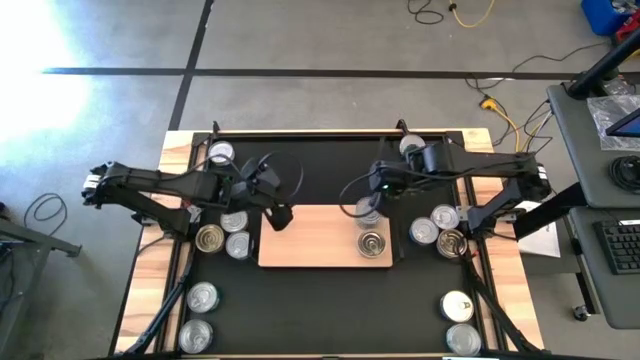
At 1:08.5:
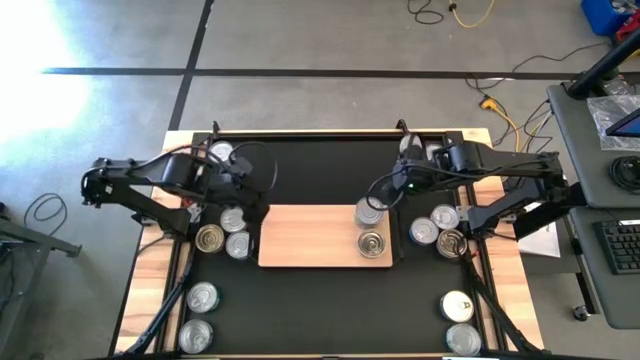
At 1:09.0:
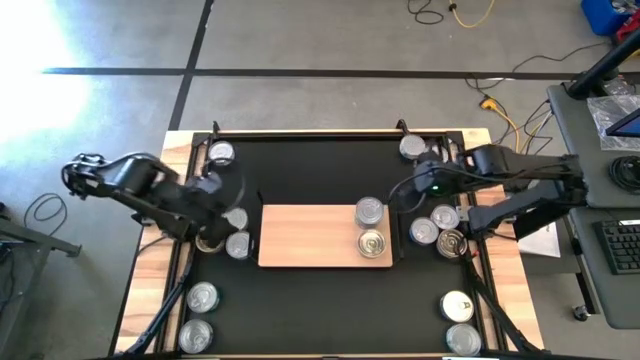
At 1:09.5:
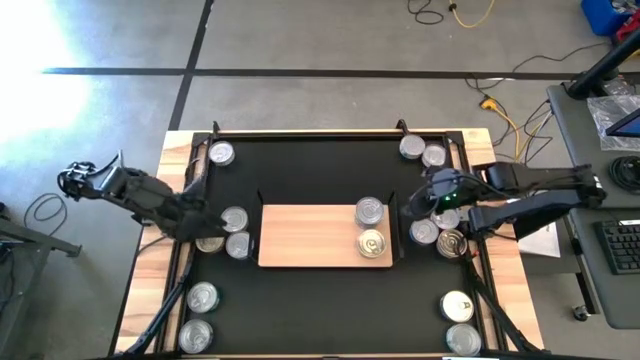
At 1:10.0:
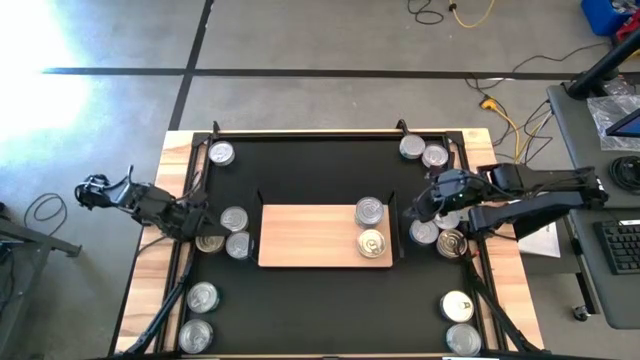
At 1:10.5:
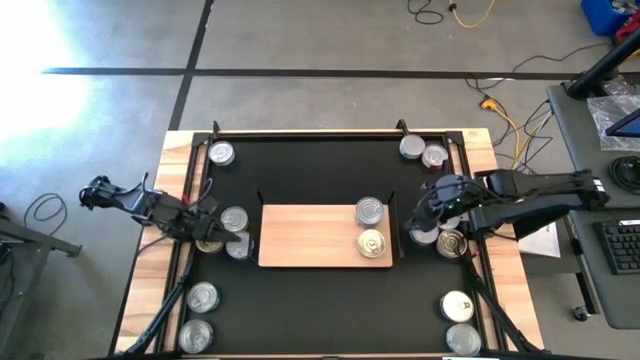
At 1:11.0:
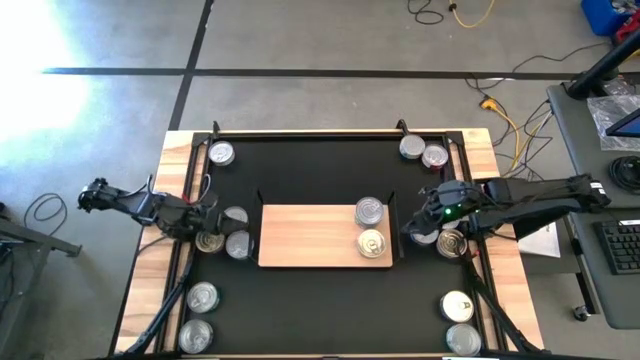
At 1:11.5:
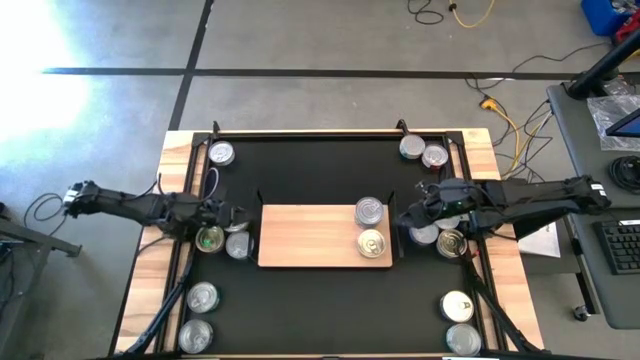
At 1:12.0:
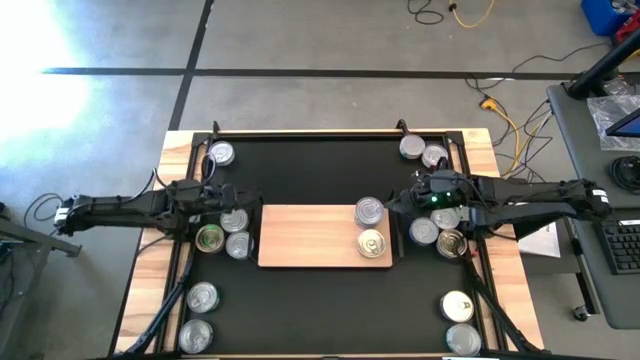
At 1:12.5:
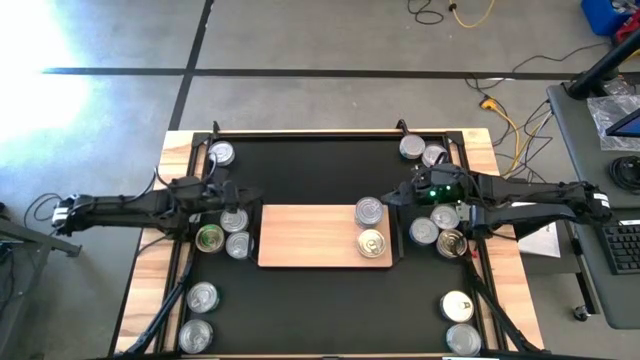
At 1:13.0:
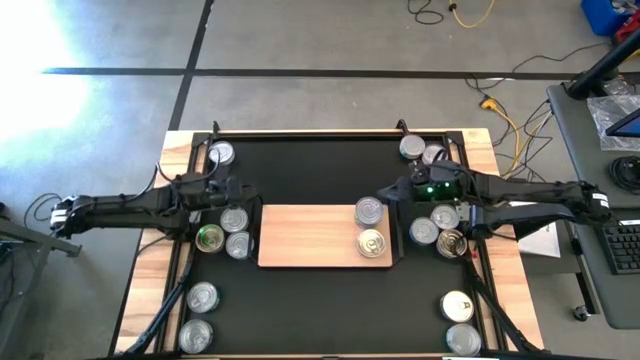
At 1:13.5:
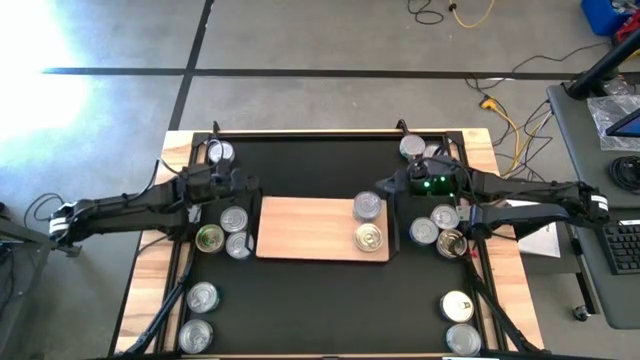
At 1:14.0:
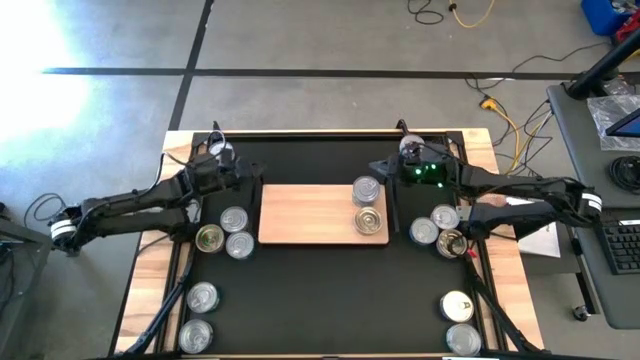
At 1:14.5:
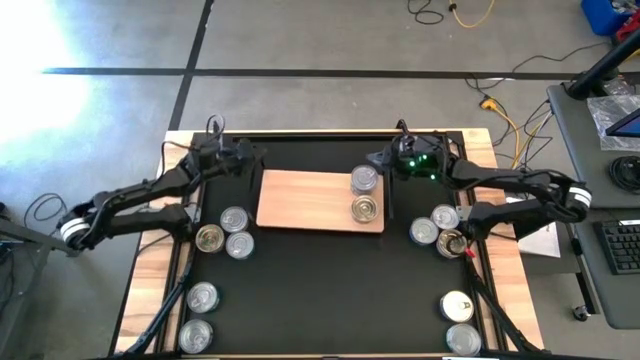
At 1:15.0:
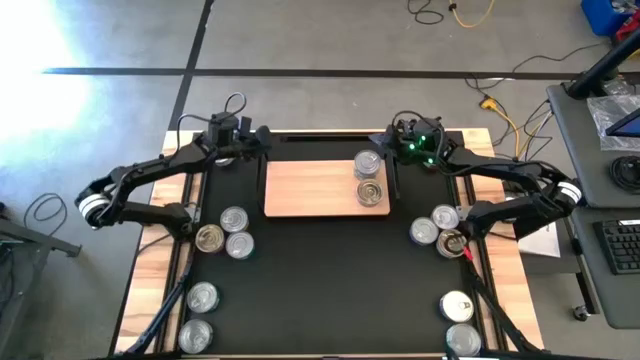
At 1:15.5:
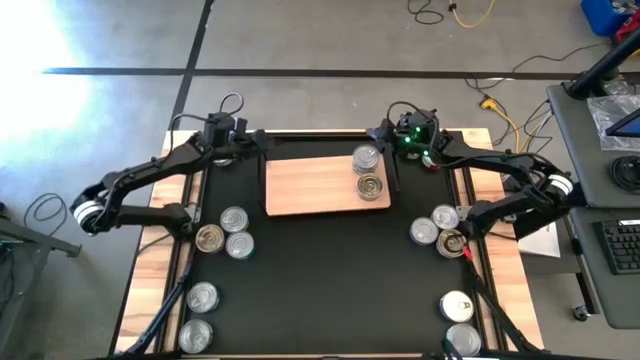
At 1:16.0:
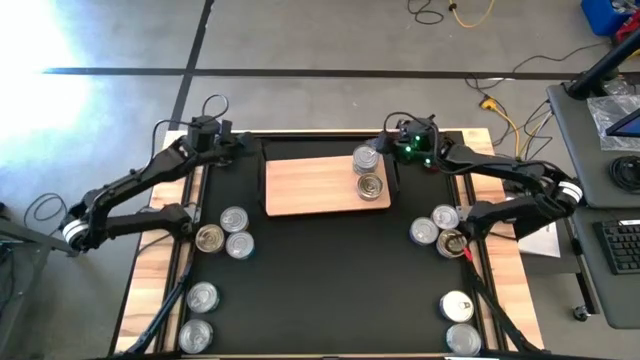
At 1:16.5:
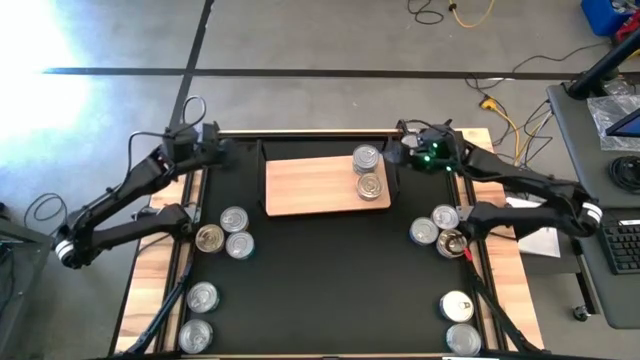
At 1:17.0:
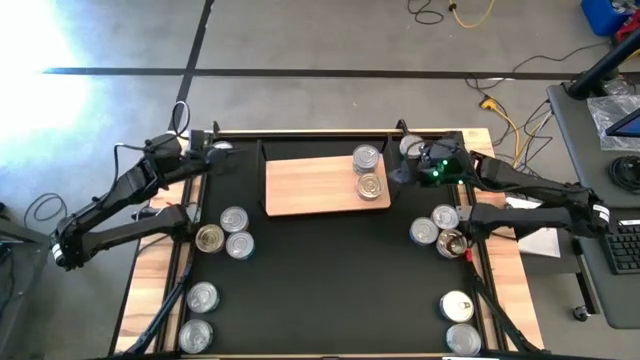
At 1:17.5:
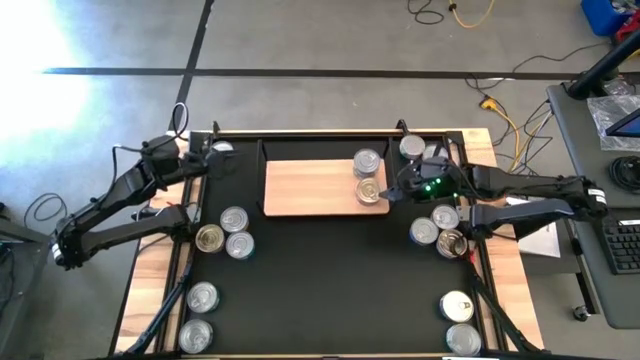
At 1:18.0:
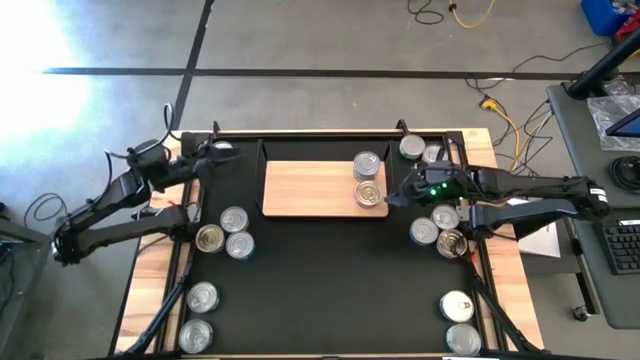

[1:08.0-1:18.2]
Task: Stack canned seafood by type on shelf
Move the shelf to the top of the table

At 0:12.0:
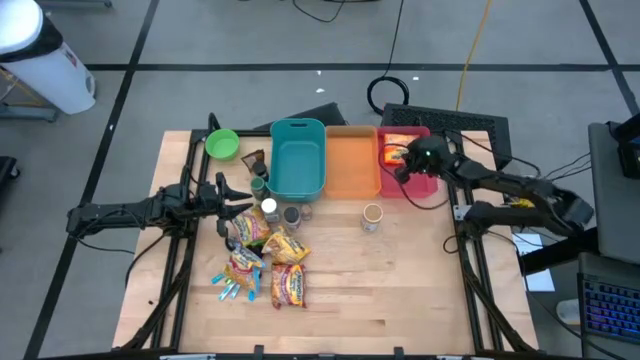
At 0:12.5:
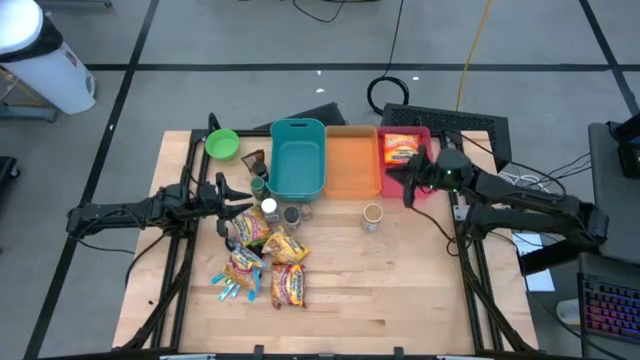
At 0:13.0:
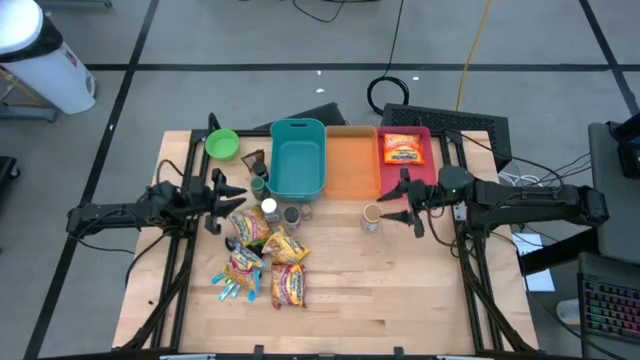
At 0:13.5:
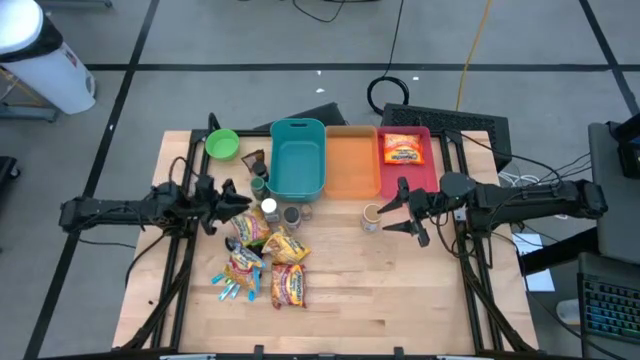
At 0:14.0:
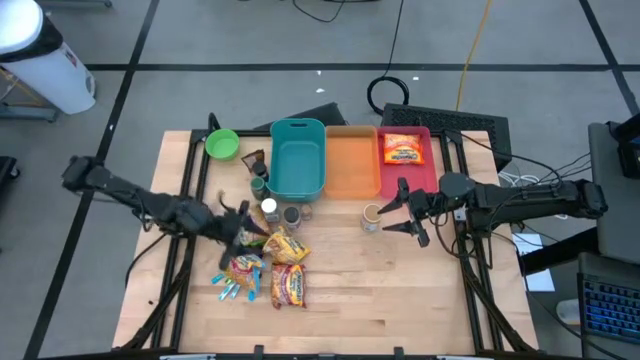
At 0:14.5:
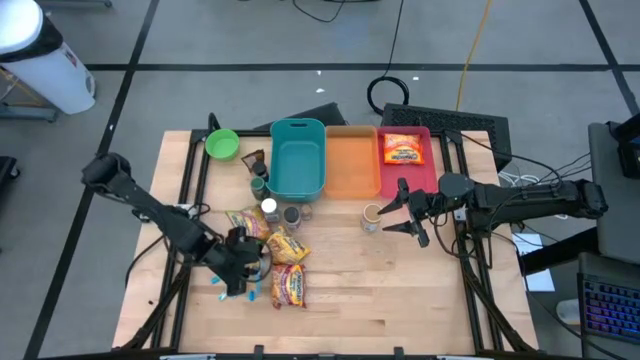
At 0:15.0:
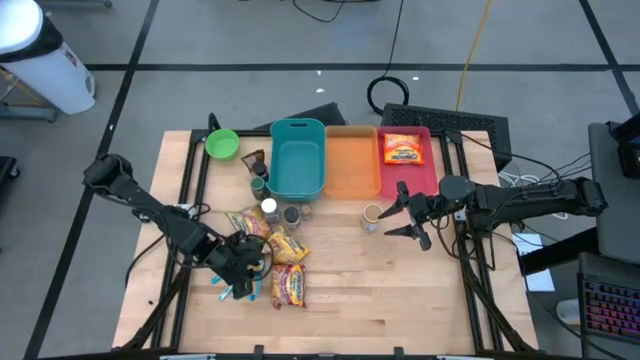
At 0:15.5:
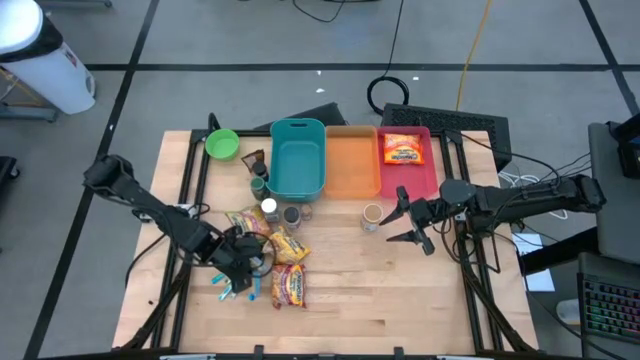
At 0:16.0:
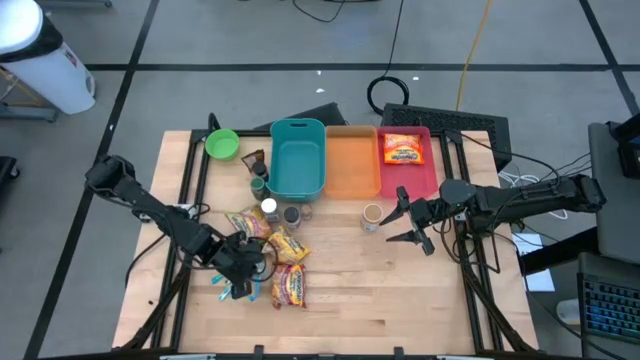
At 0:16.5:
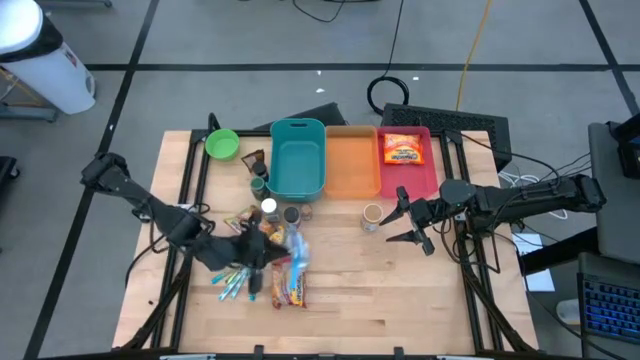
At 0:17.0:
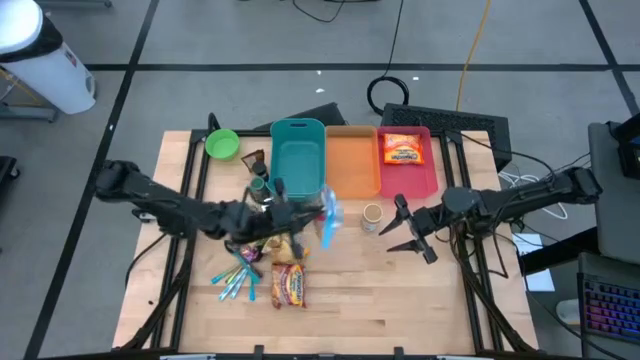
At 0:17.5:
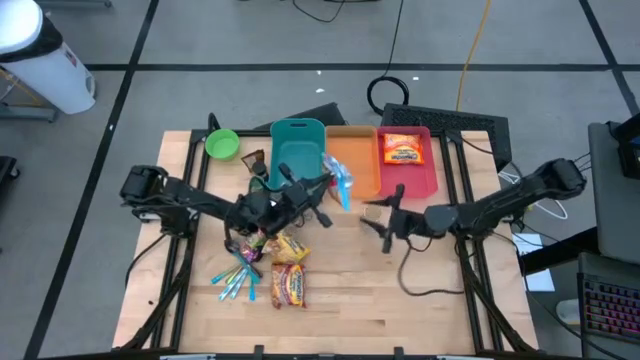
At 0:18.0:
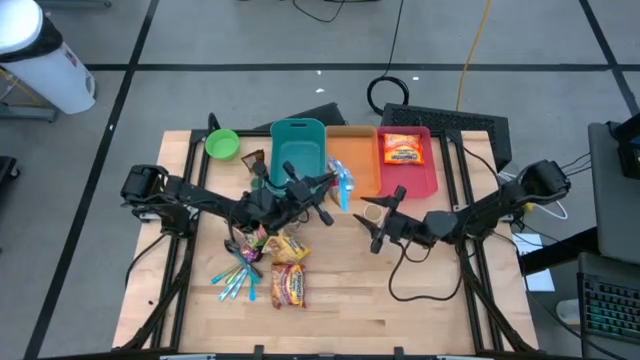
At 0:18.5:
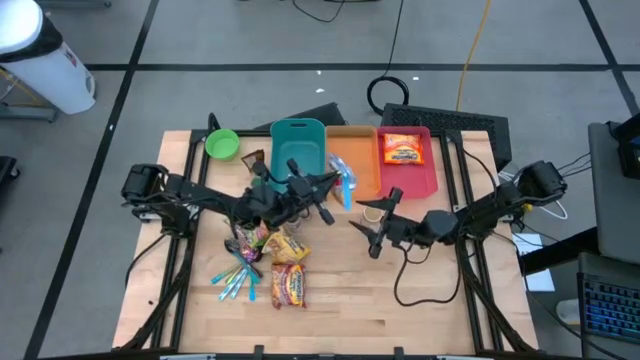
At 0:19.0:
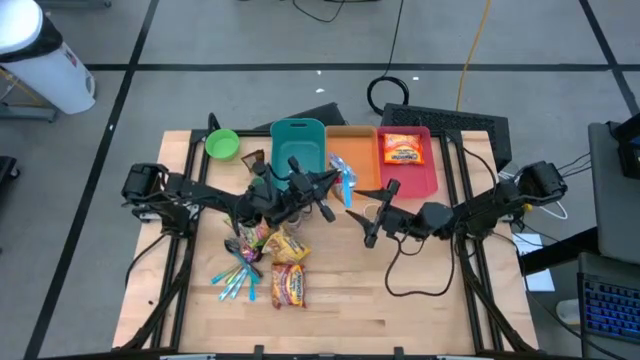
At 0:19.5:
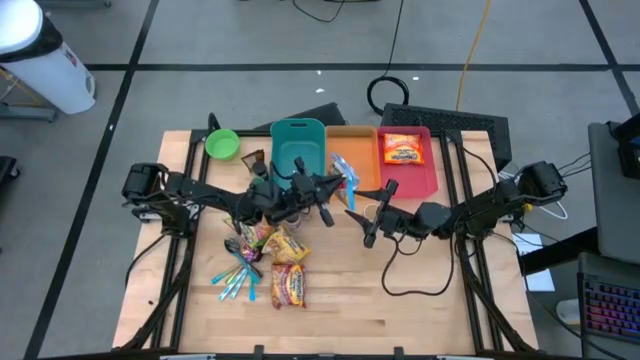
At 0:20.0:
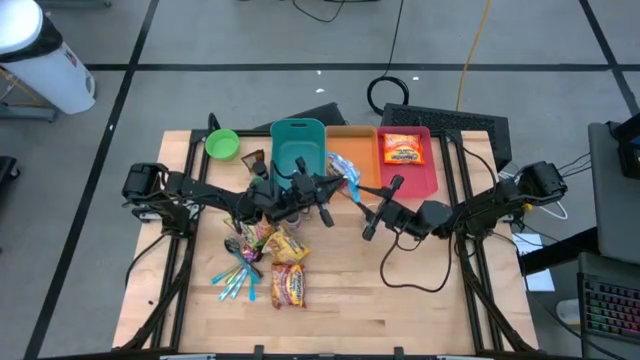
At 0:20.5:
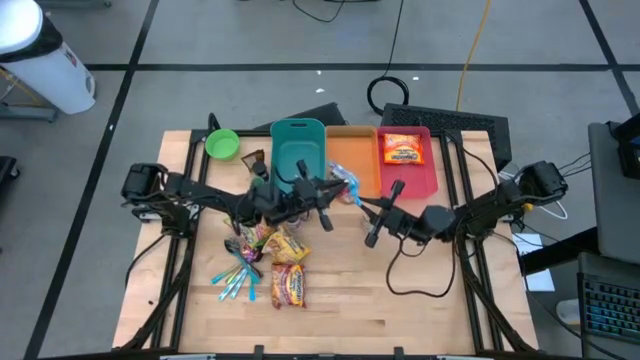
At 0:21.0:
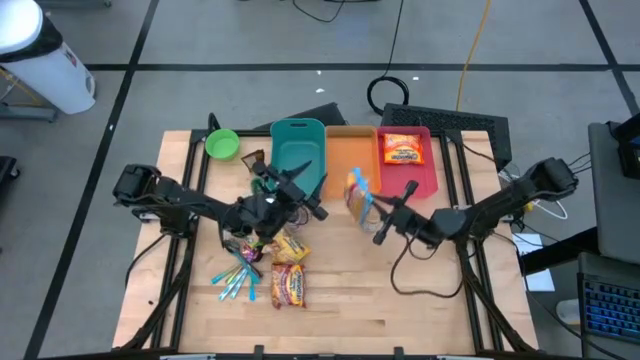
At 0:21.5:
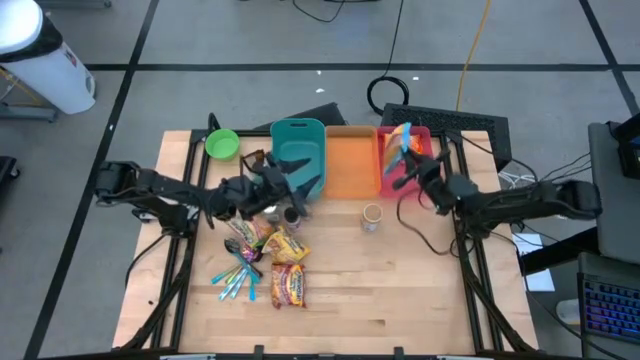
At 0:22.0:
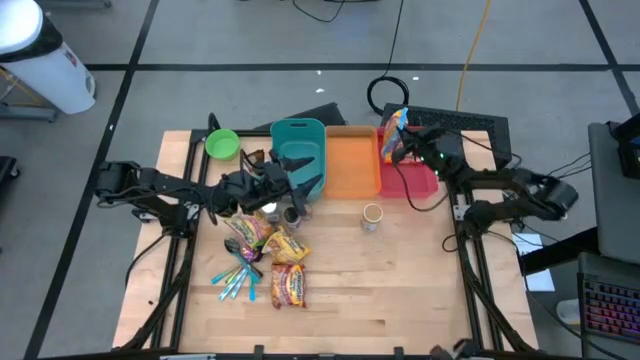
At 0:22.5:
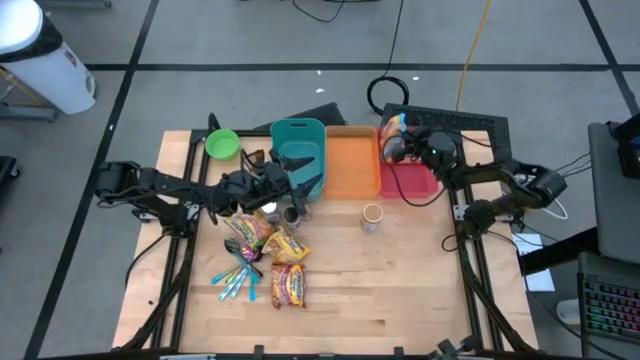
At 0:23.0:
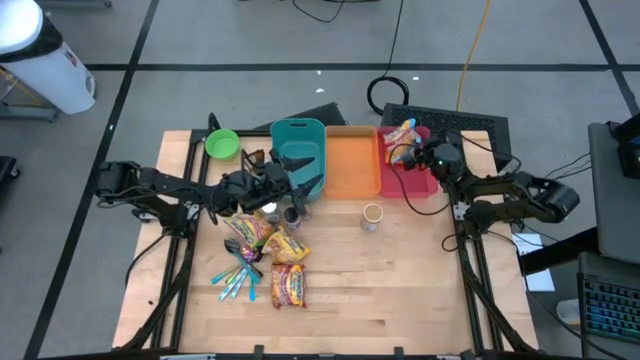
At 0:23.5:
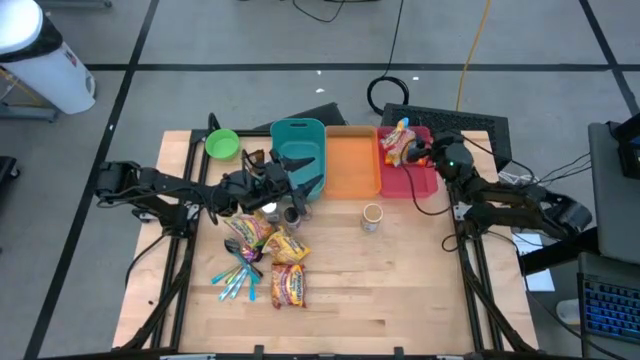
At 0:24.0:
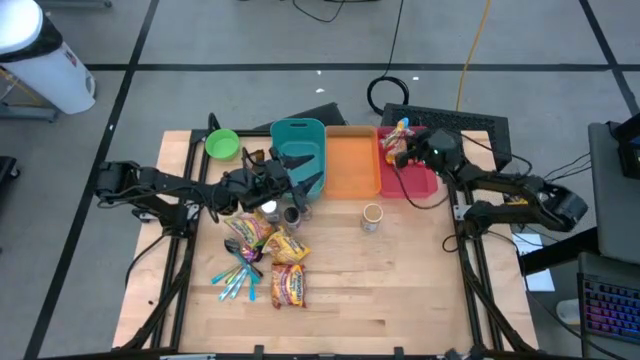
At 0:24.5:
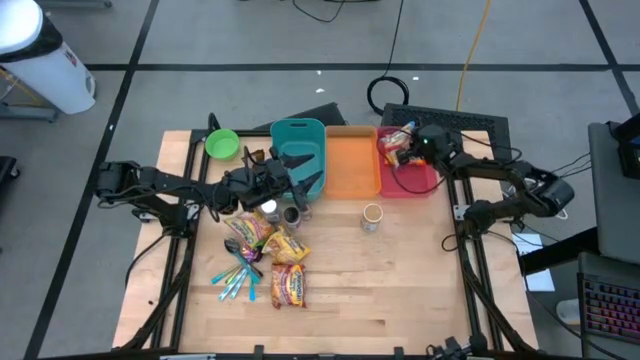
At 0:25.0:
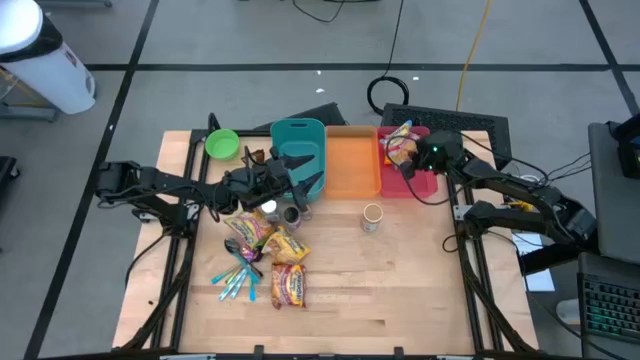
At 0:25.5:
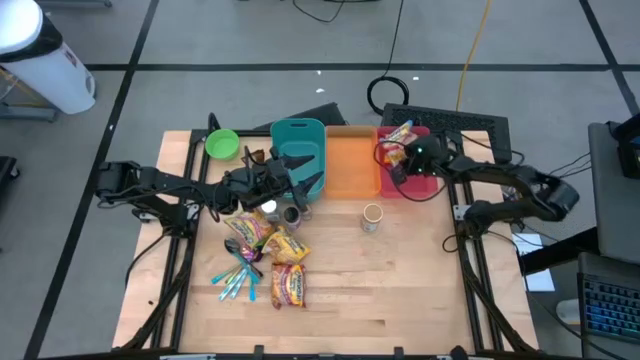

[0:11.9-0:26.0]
Task: Pick & Place Food Item
Put the blue noodle pack into the red bin
